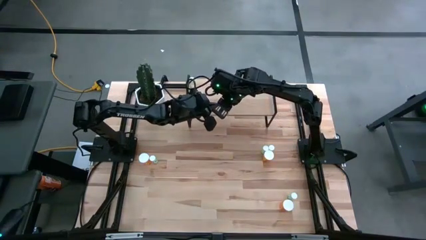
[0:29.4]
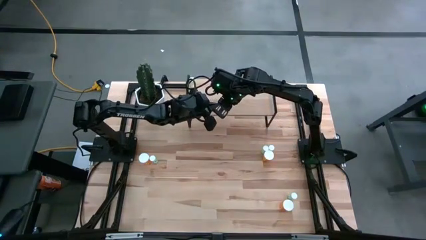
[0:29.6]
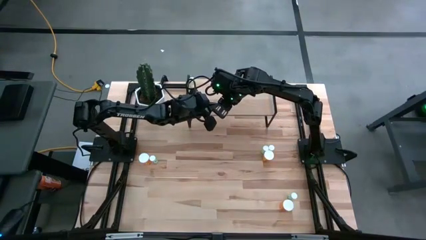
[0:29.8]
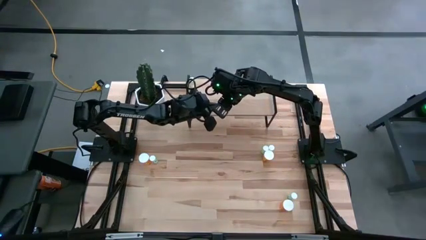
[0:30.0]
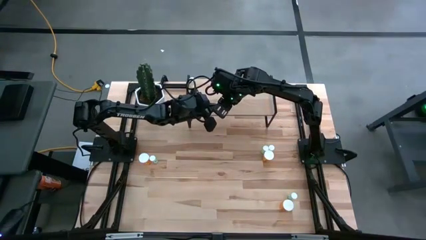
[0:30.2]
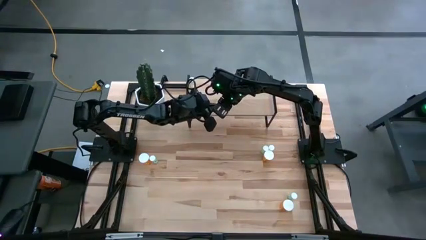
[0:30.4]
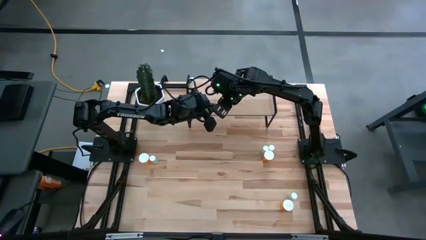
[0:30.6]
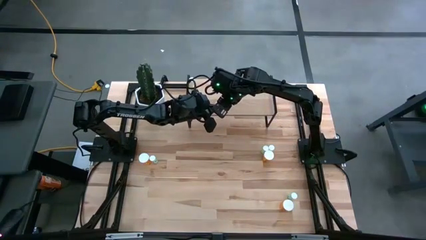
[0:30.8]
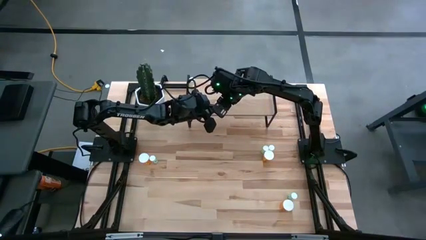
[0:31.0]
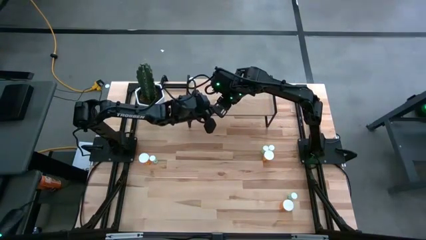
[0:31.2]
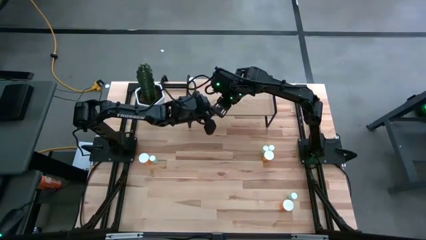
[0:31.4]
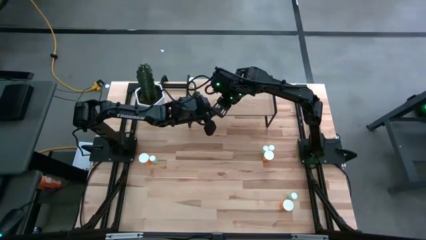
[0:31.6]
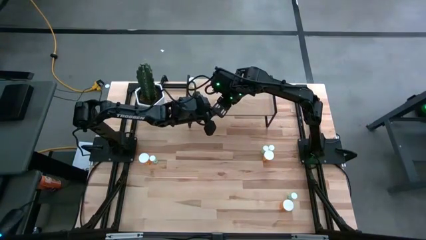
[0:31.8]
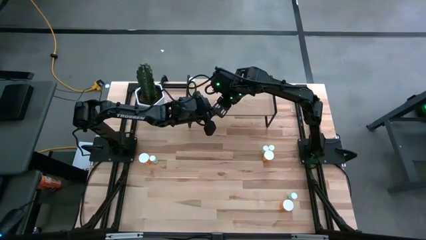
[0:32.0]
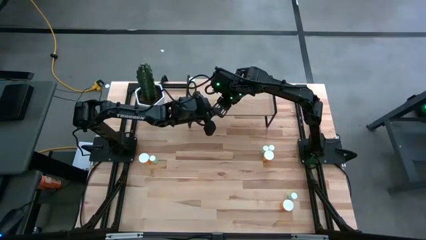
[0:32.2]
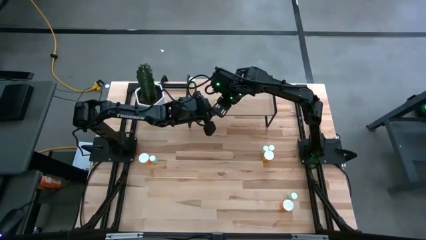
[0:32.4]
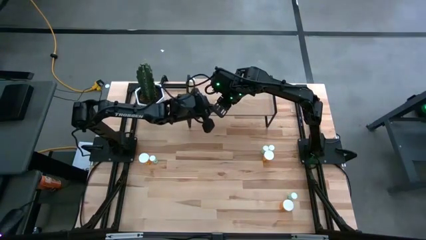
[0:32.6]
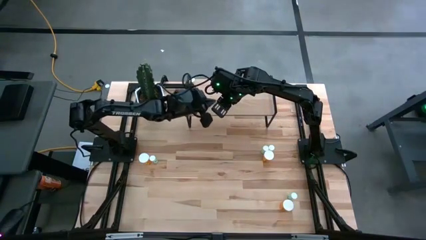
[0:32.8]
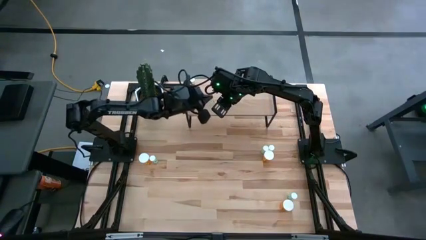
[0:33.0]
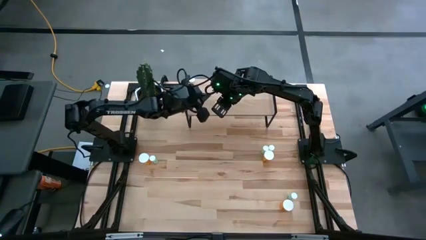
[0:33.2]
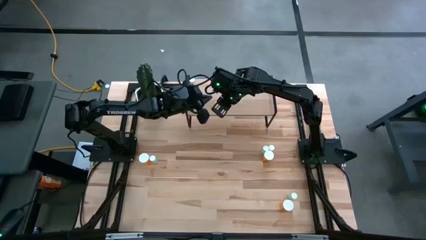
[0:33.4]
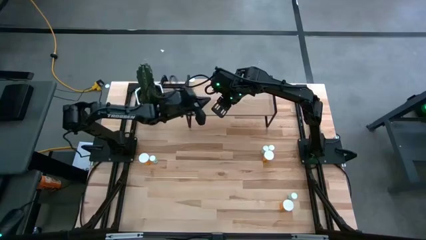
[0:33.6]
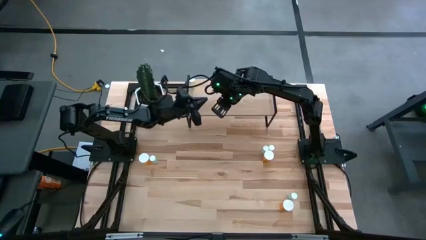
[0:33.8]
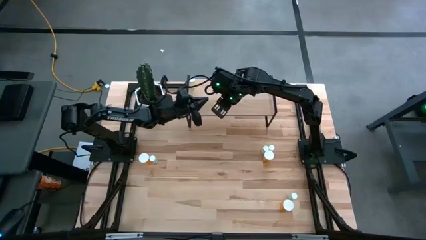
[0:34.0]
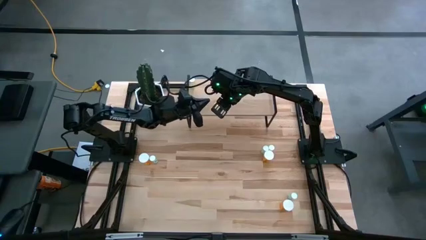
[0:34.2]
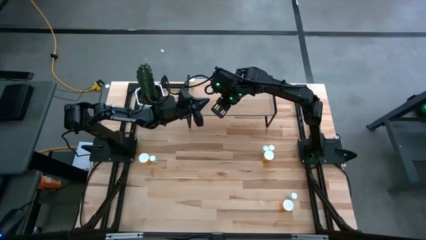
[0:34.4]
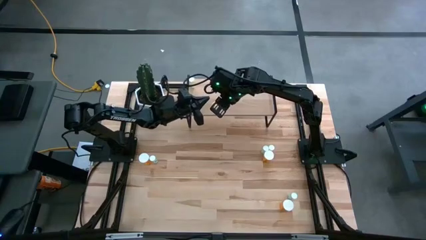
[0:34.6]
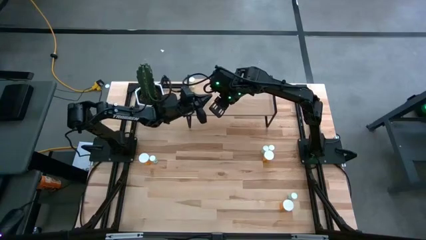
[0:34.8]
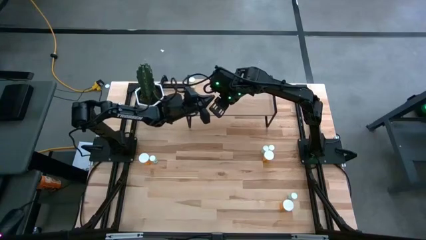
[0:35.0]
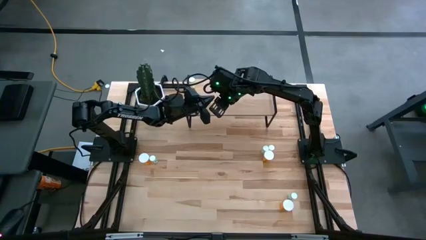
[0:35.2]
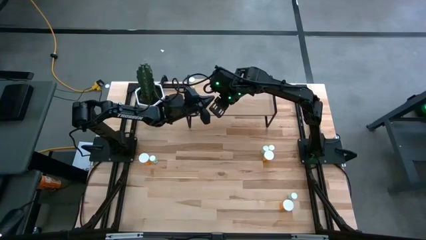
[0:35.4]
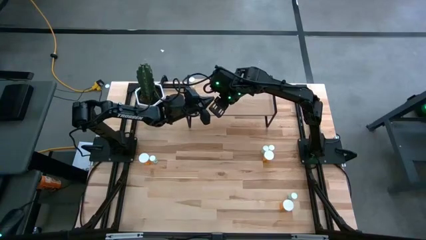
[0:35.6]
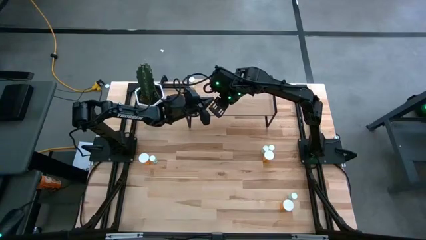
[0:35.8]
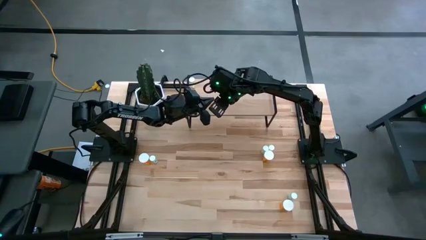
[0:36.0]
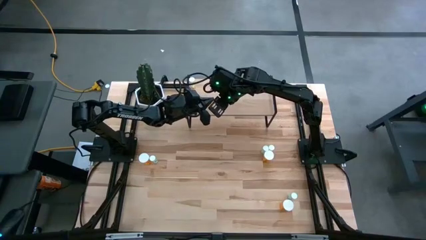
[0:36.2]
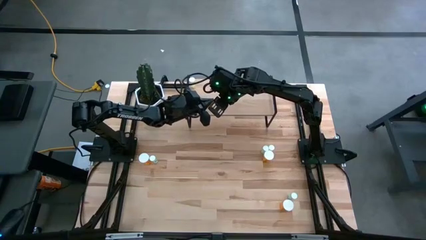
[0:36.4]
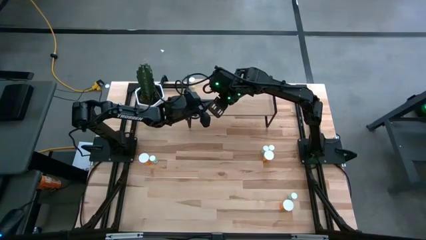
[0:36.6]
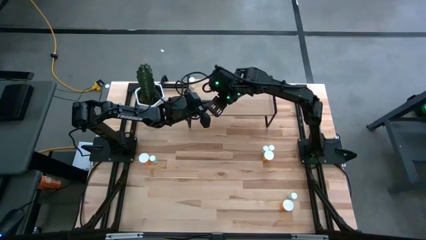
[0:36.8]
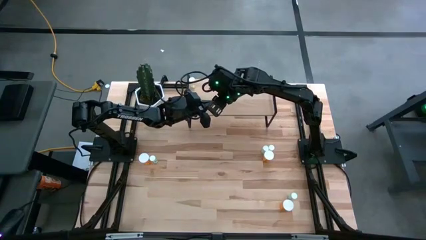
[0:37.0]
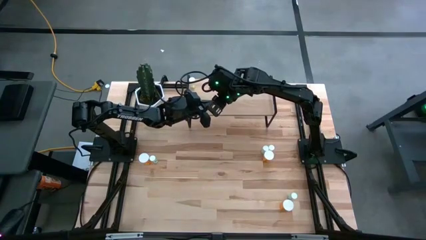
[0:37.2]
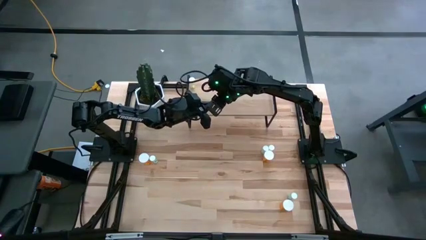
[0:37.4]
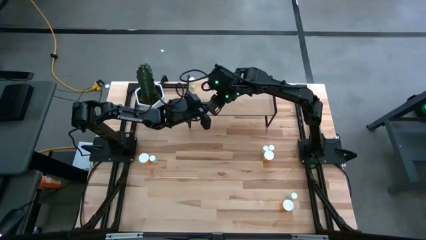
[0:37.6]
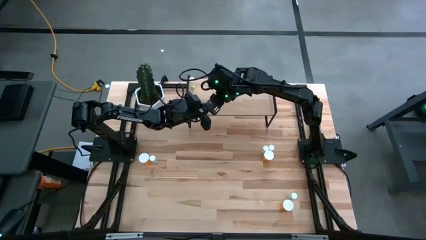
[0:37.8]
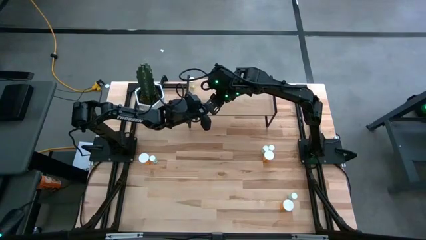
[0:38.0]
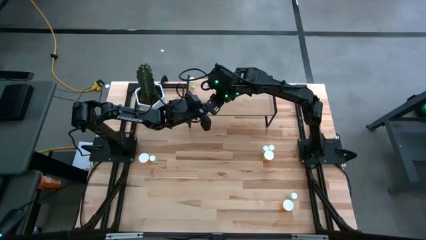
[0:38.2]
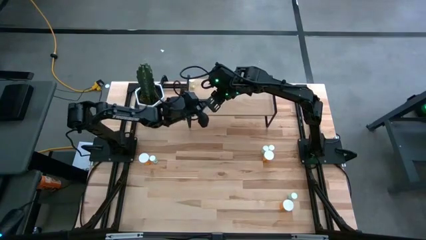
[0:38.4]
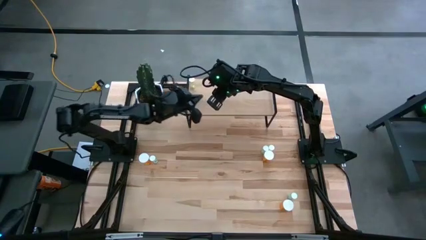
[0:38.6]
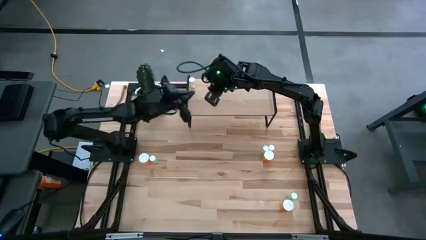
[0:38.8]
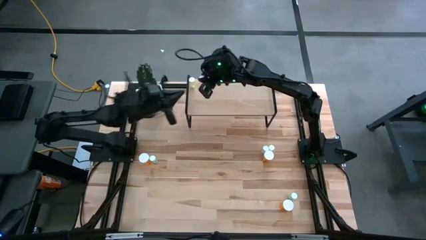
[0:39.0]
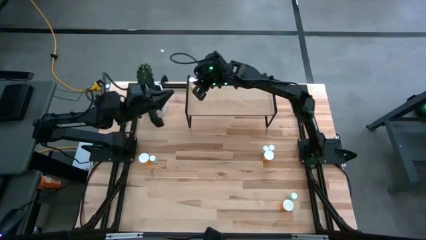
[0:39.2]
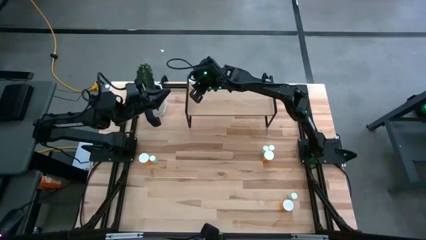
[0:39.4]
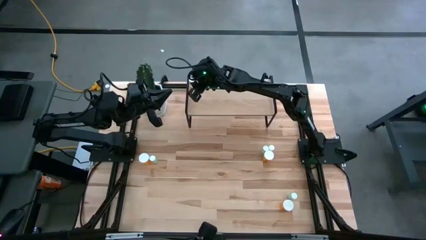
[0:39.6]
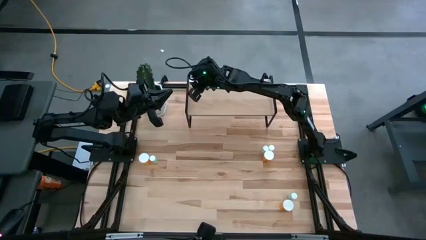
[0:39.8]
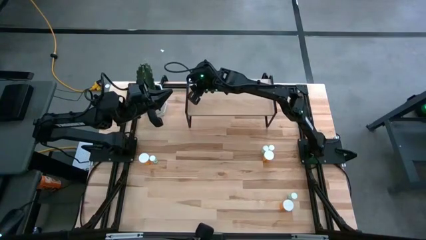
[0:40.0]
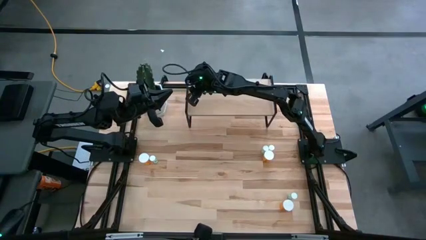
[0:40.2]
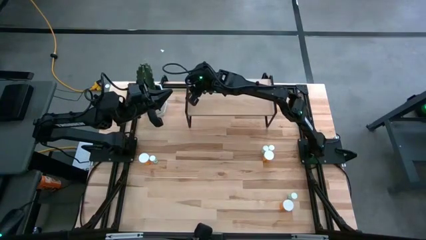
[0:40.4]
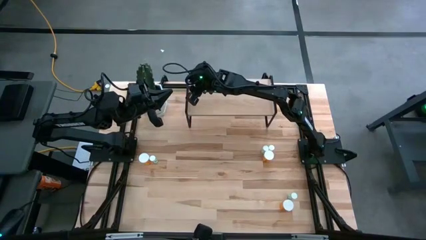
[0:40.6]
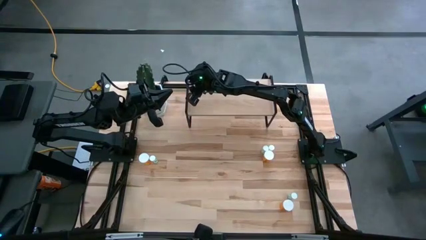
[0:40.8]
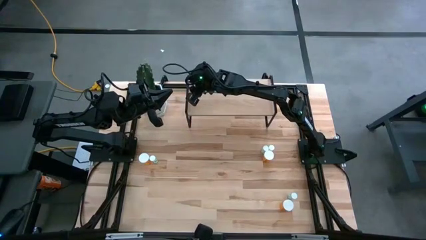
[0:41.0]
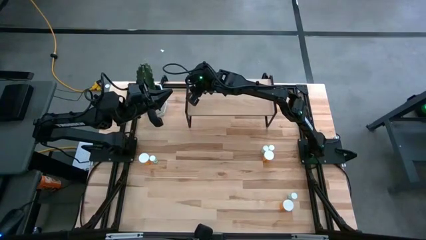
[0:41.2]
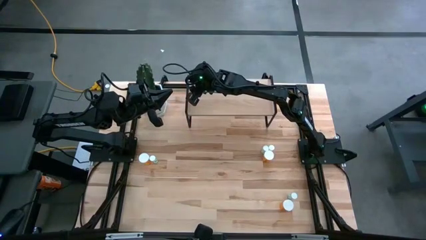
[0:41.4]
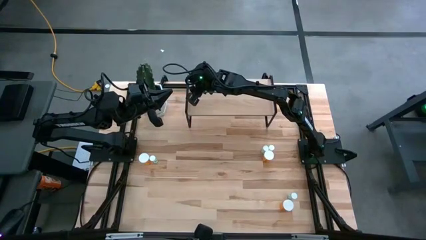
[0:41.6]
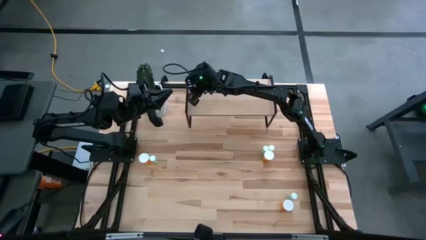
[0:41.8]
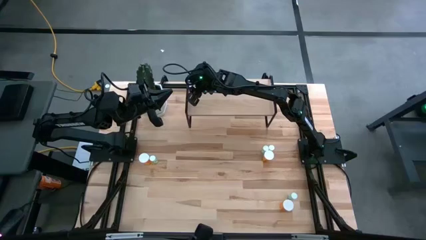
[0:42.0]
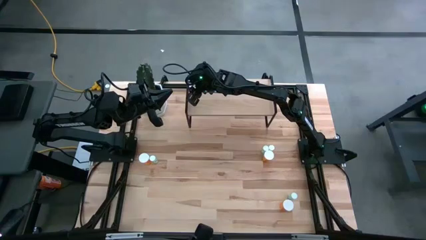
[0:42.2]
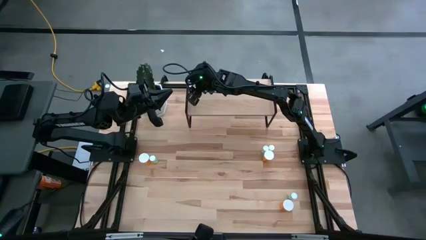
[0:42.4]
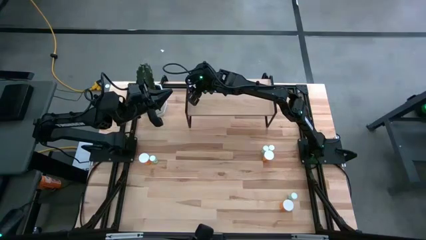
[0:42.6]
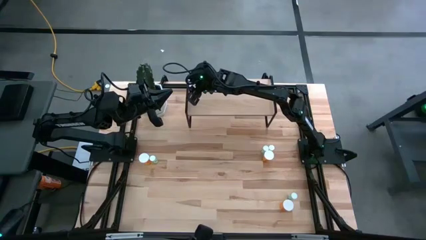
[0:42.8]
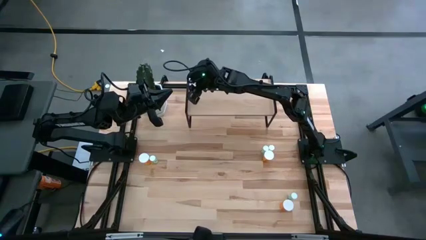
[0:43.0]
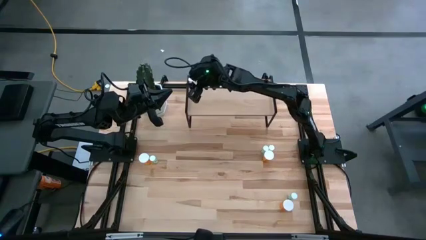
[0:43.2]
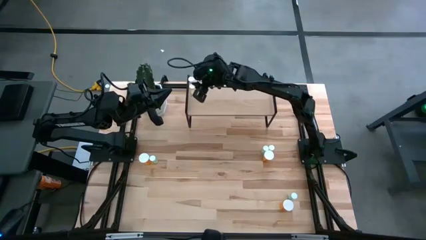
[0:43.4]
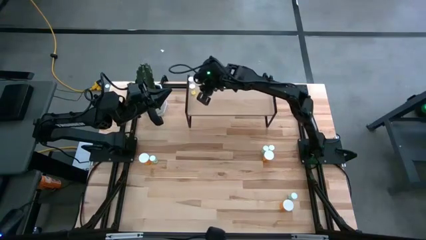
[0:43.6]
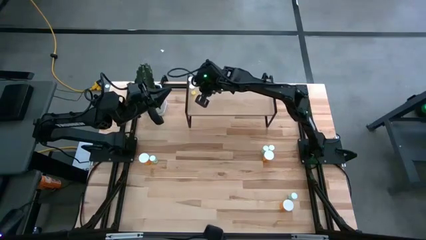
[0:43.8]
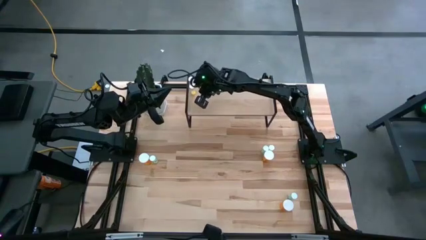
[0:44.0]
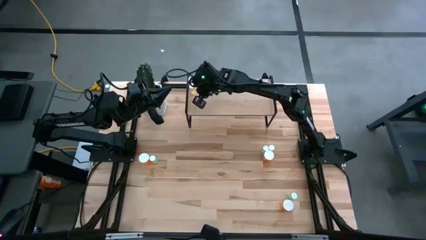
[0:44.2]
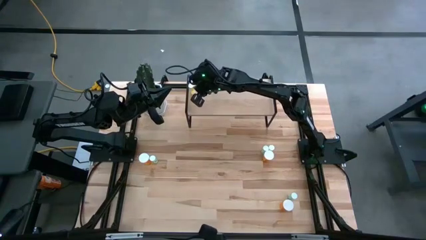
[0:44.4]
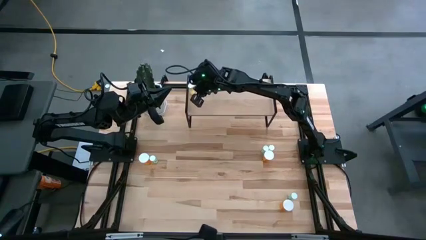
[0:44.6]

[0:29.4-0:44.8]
Task: Pick and place medicine bottles onto shelf by color
Align the bottom yellow pill bottle with the other yellow pill bottle on the shelf

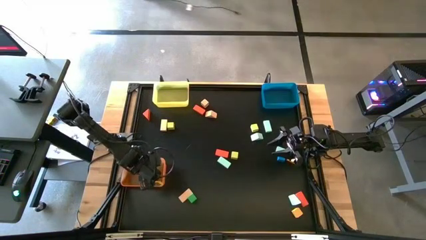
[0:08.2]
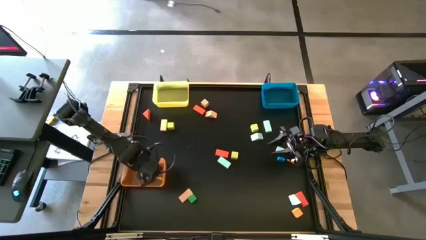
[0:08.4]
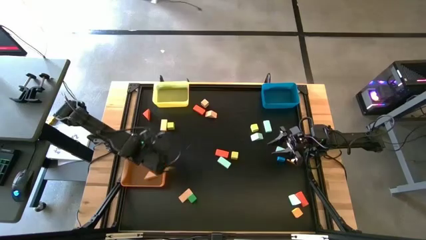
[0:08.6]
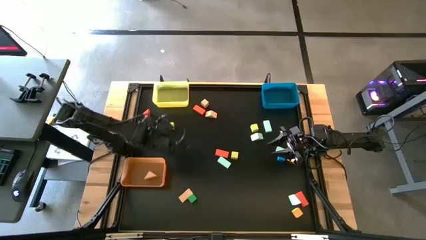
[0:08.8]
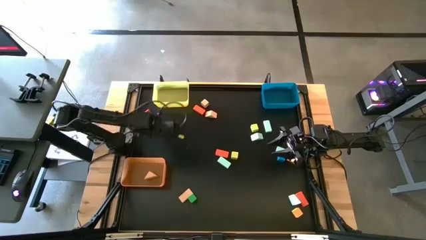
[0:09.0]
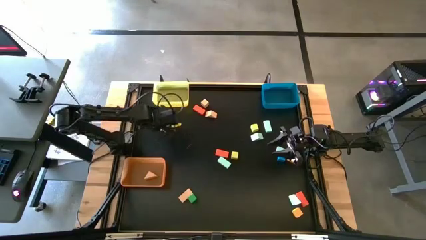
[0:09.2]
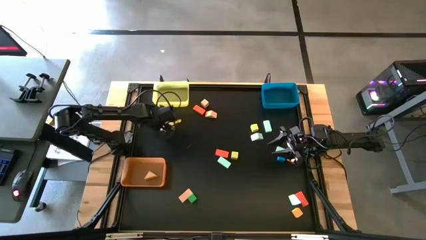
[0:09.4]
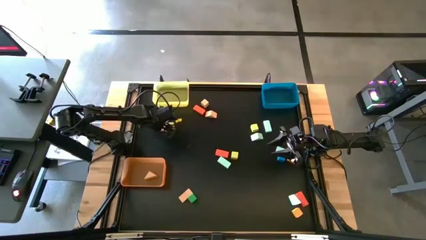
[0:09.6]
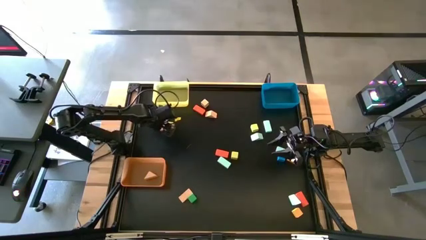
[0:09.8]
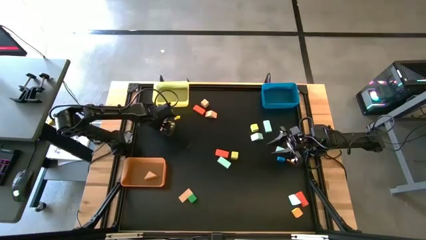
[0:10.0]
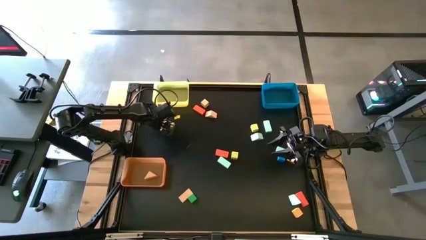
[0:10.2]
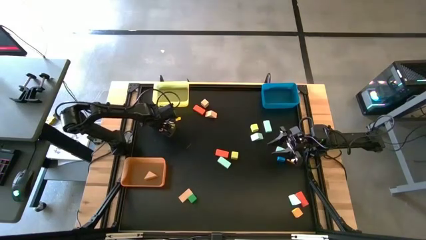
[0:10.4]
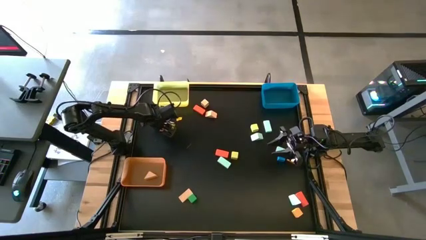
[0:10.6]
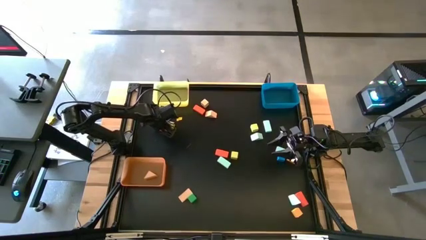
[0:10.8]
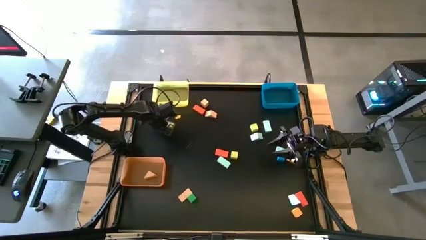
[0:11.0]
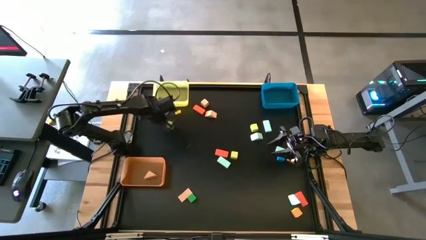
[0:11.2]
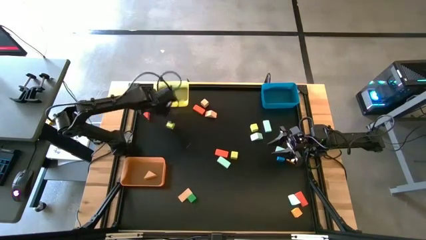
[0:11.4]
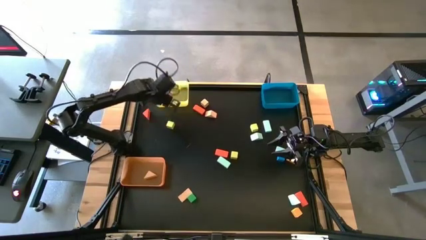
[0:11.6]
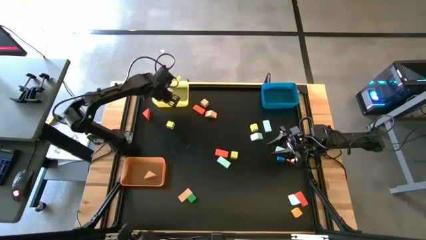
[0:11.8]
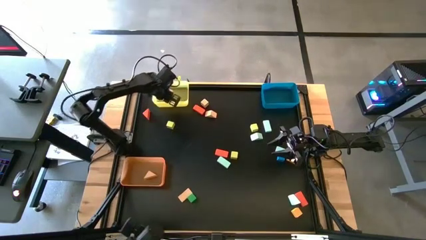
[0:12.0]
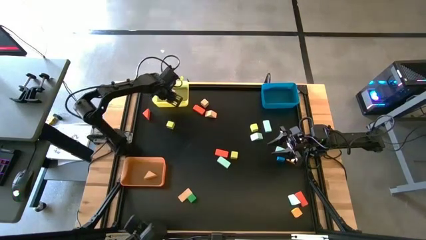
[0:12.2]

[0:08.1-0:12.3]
Task: Sort blocks by size
Put the brown wooden block into the yellow bin
